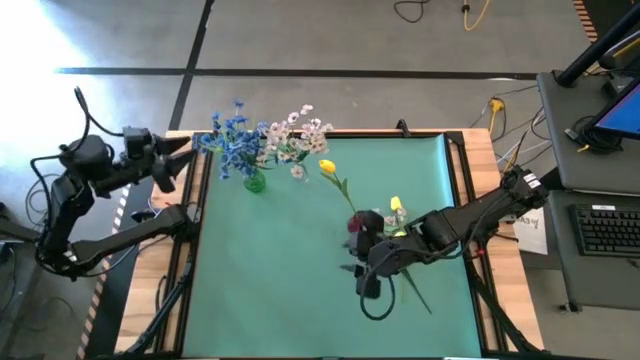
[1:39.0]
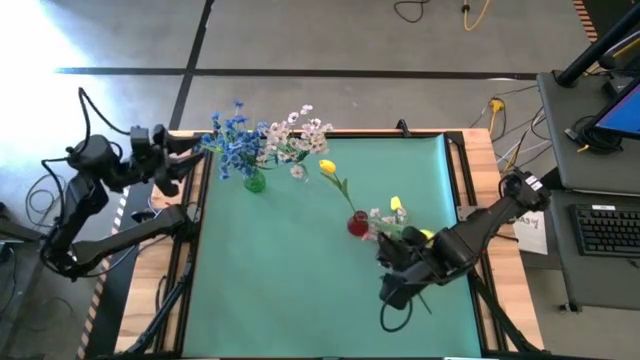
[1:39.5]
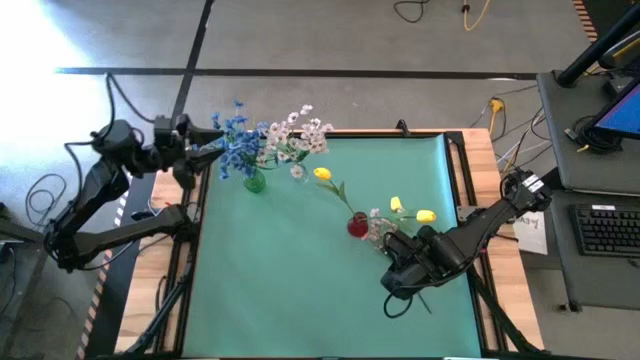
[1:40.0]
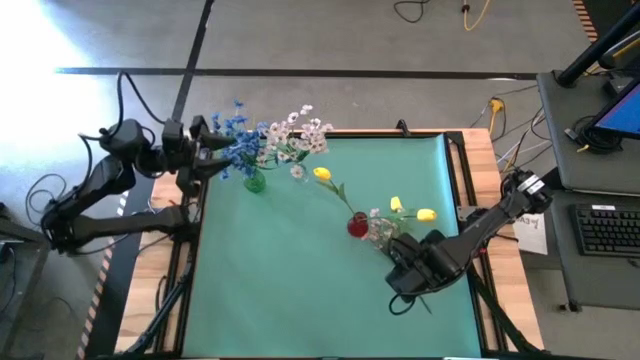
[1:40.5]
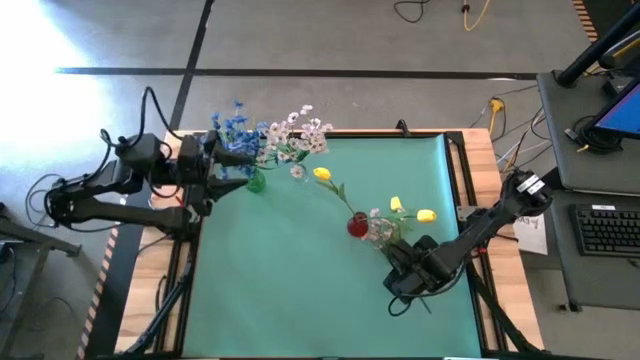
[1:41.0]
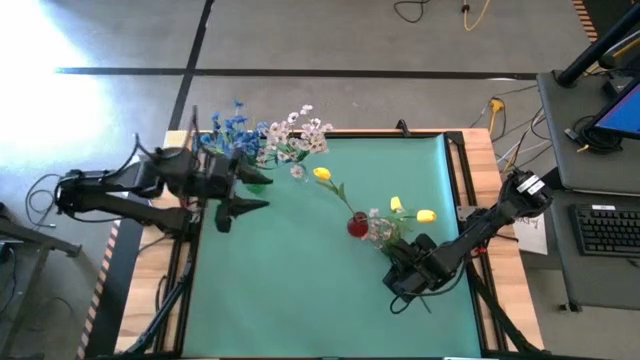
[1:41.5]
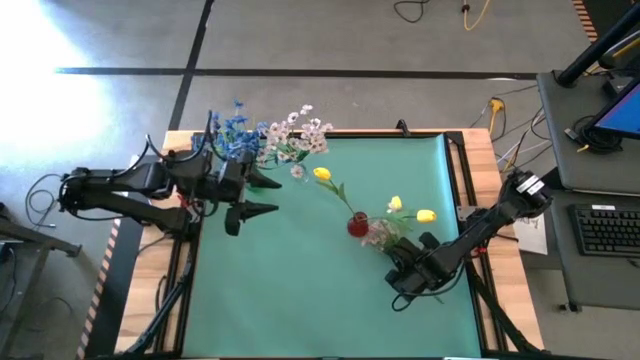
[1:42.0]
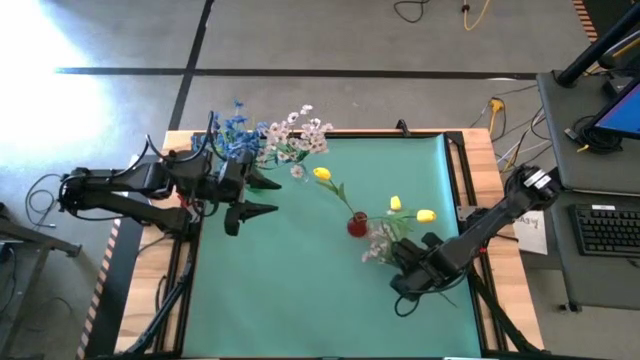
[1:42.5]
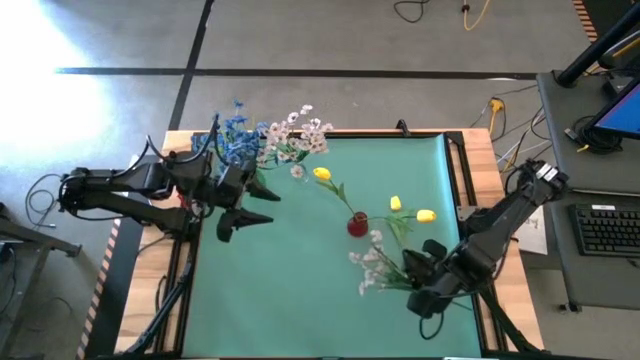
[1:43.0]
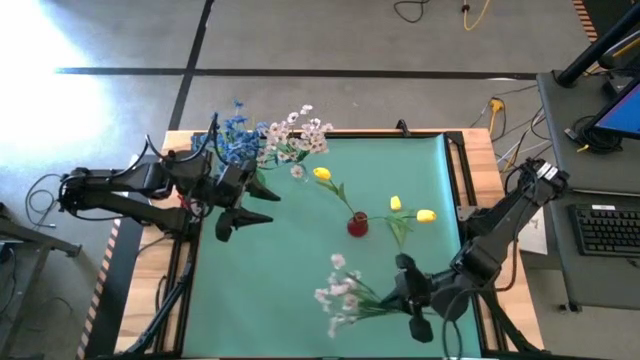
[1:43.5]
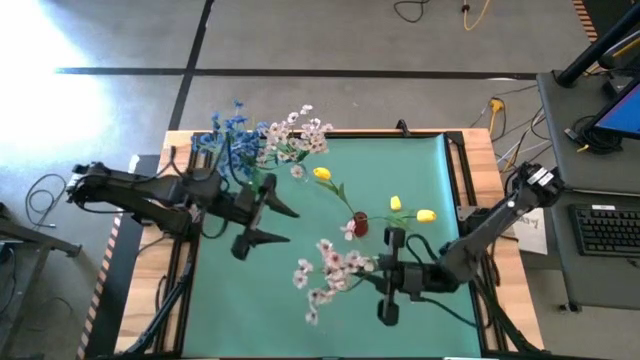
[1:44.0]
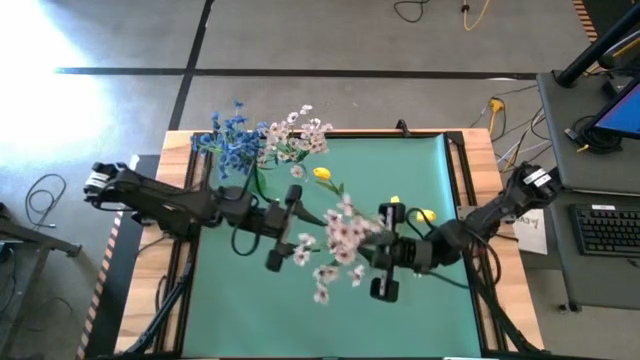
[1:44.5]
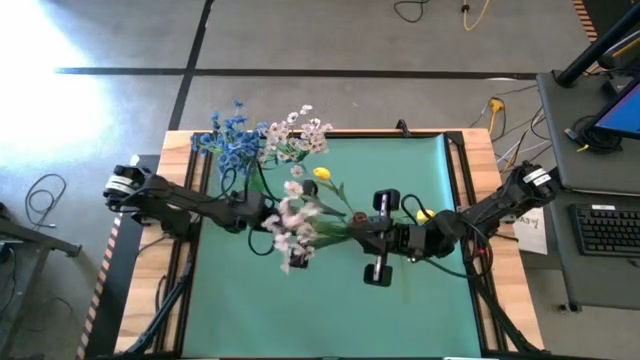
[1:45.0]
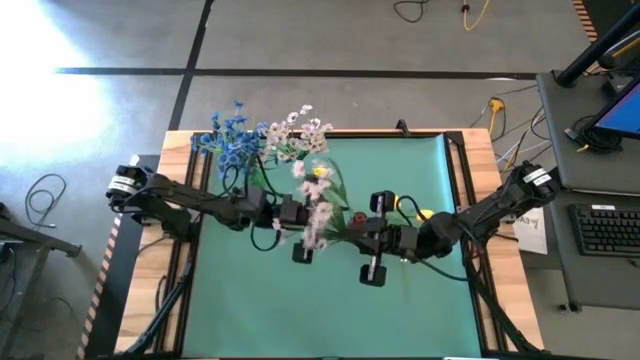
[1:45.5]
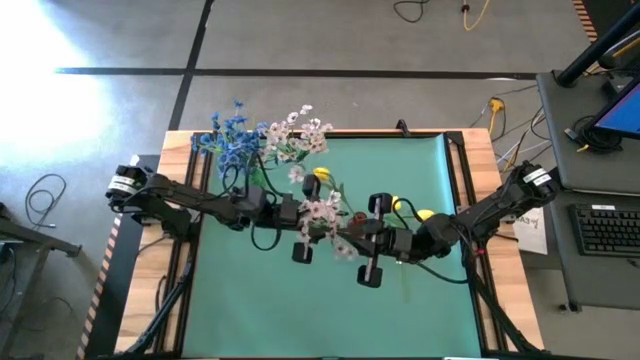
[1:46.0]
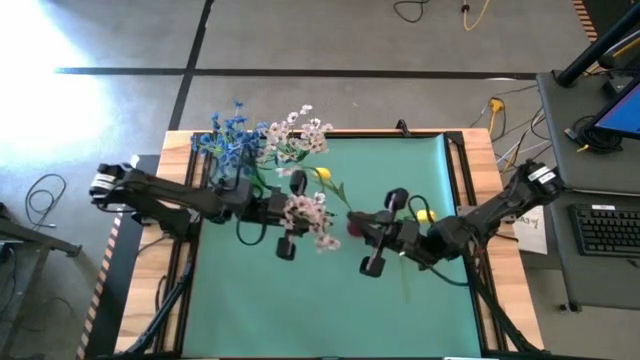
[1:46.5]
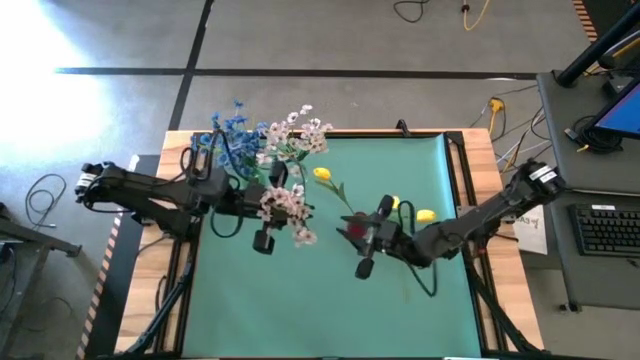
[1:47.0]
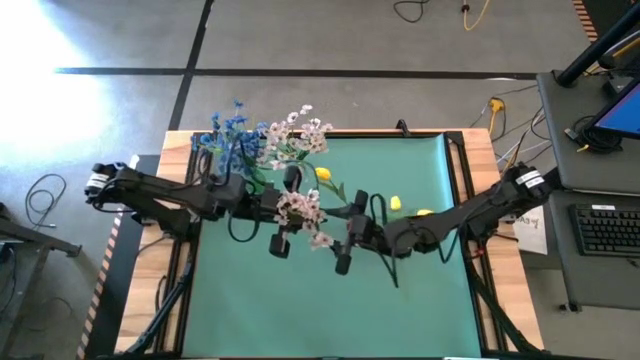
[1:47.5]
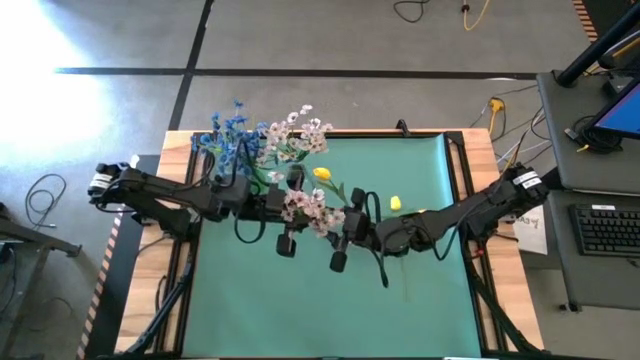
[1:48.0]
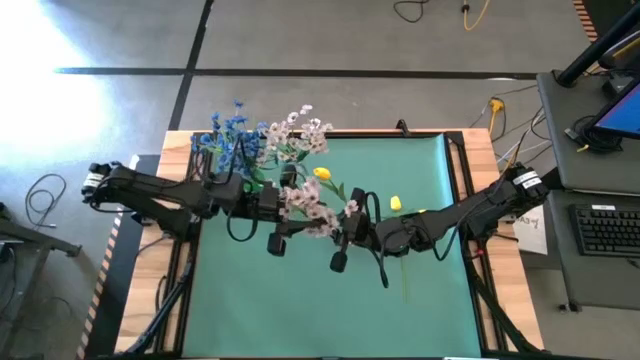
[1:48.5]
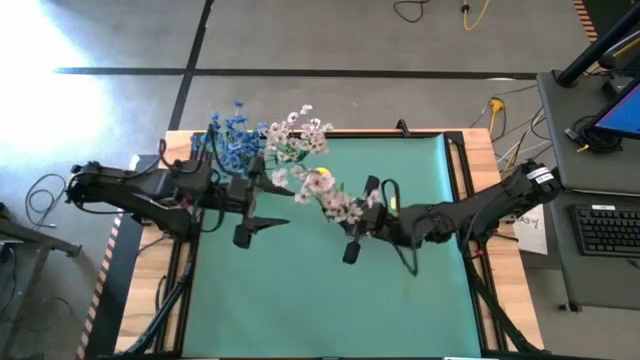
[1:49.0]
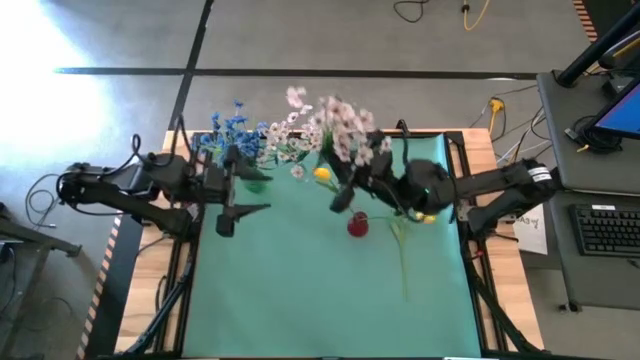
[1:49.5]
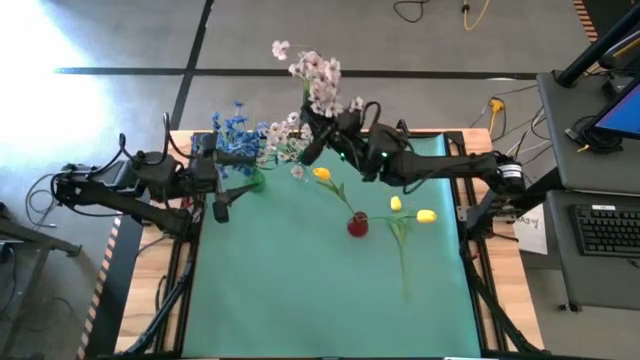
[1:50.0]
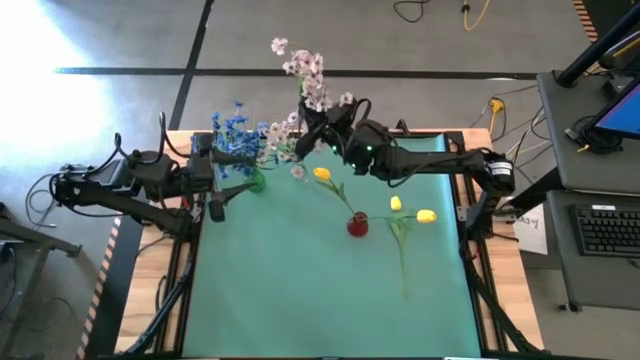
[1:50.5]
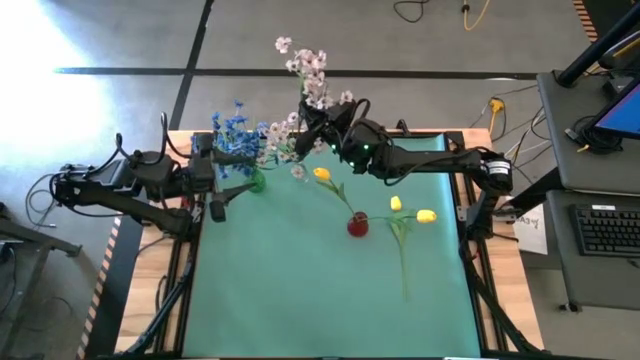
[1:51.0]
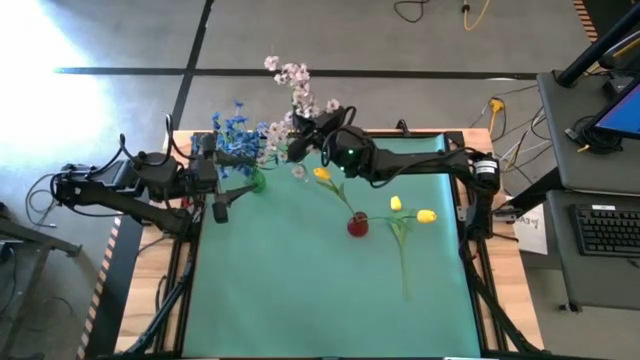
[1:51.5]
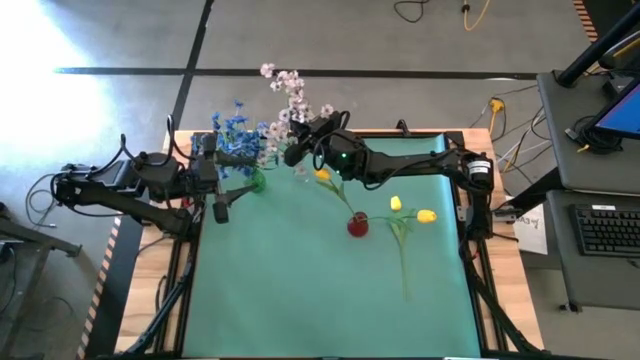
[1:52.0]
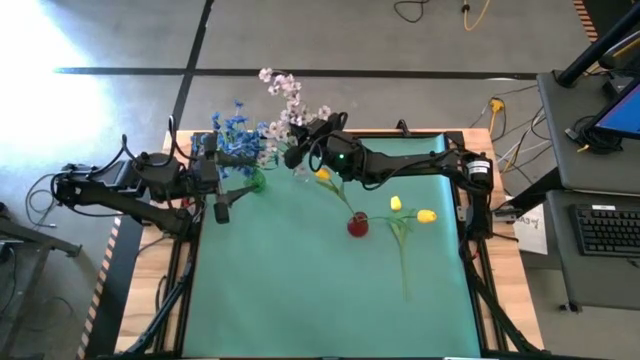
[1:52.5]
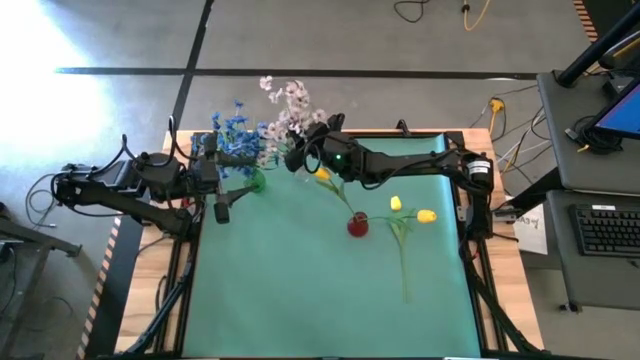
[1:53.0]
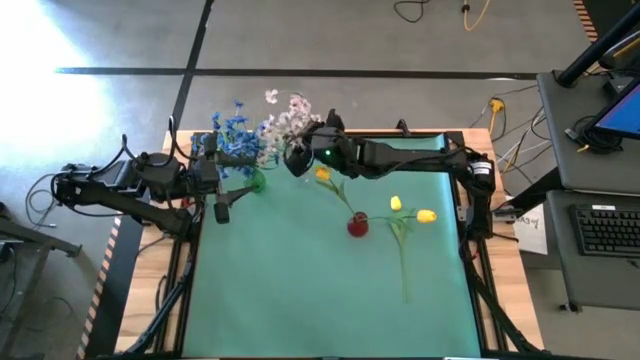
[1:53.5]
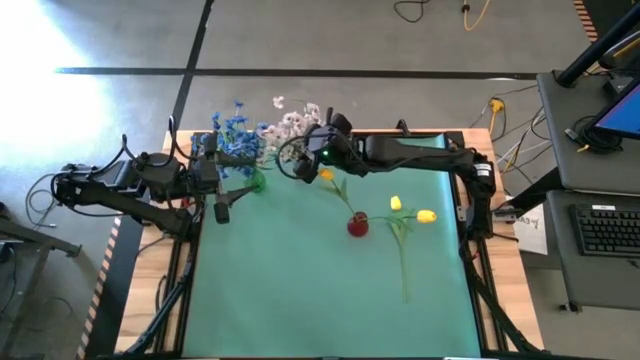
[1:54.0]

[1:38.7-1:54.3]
Task: Sort flowers into vase by color
Put the white flowers into the transparent vase

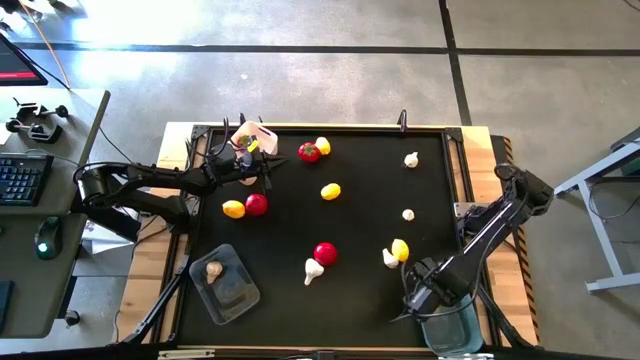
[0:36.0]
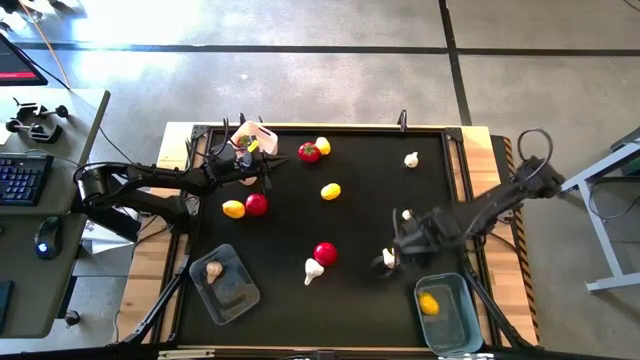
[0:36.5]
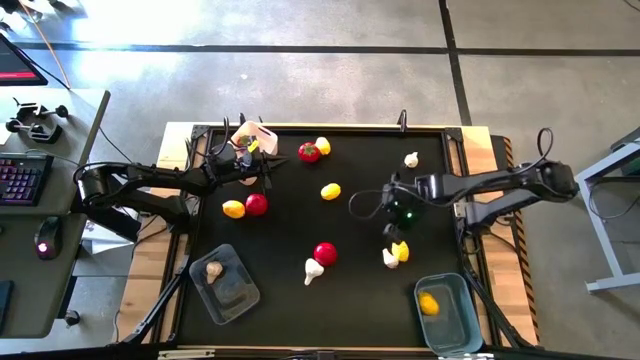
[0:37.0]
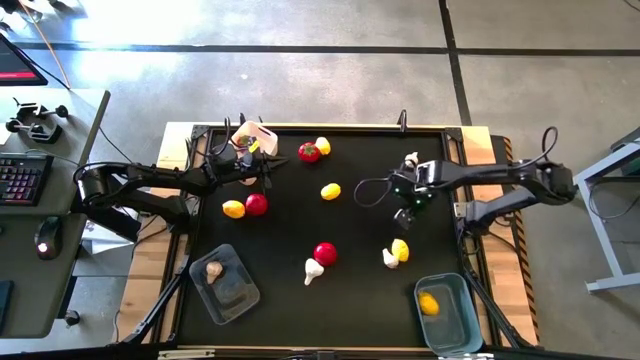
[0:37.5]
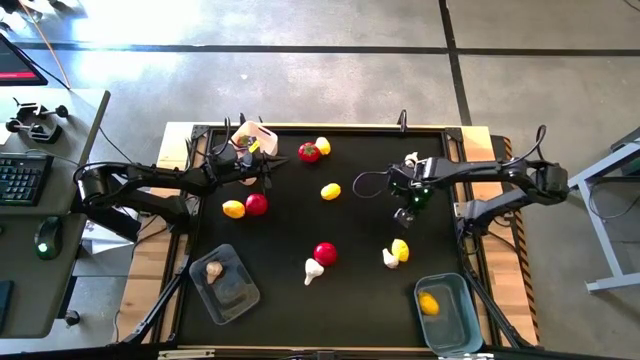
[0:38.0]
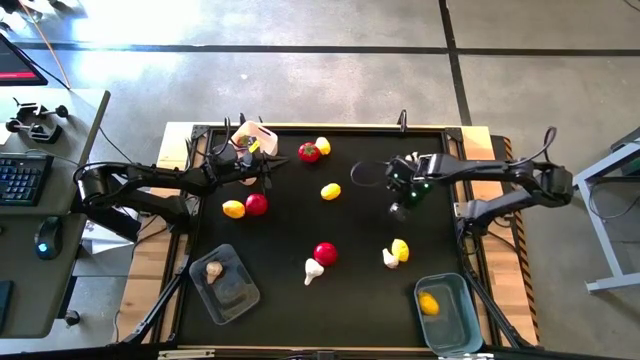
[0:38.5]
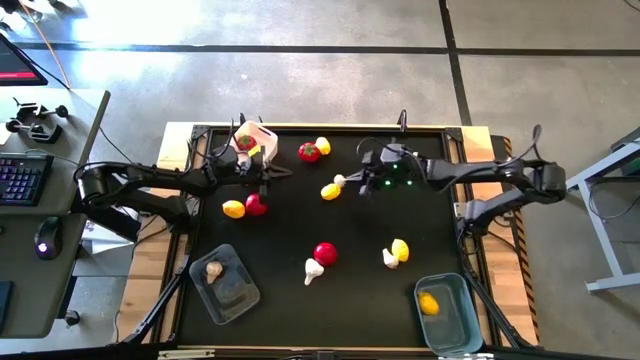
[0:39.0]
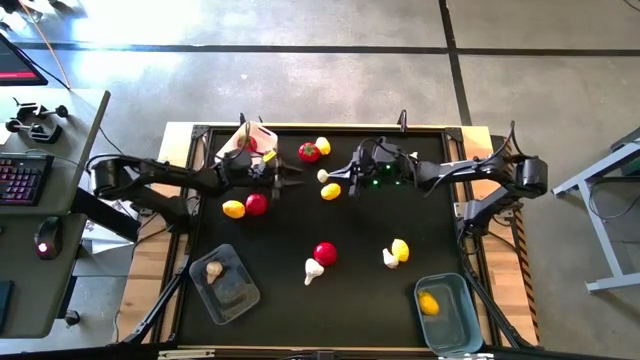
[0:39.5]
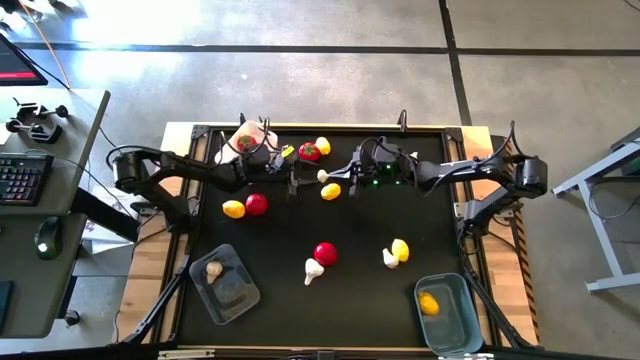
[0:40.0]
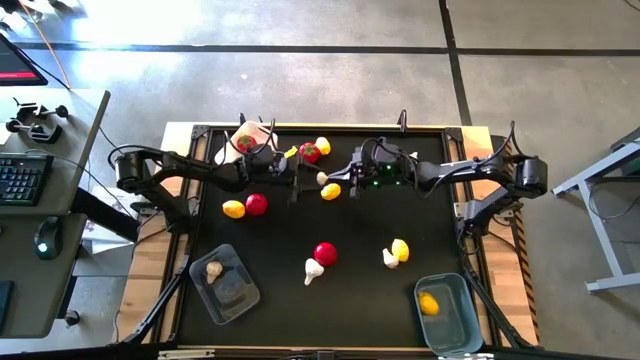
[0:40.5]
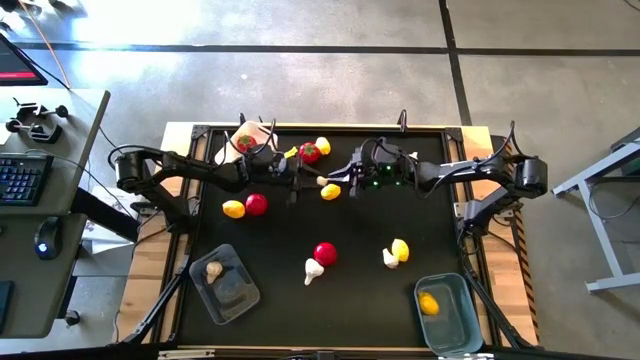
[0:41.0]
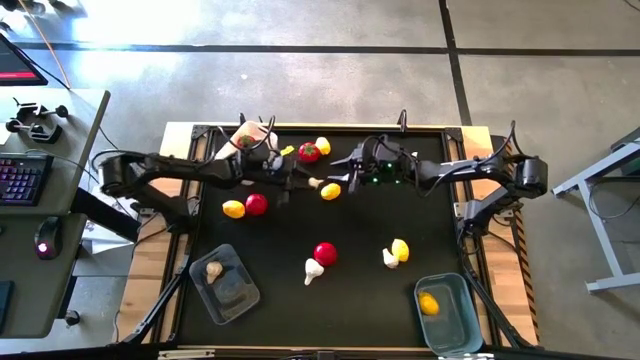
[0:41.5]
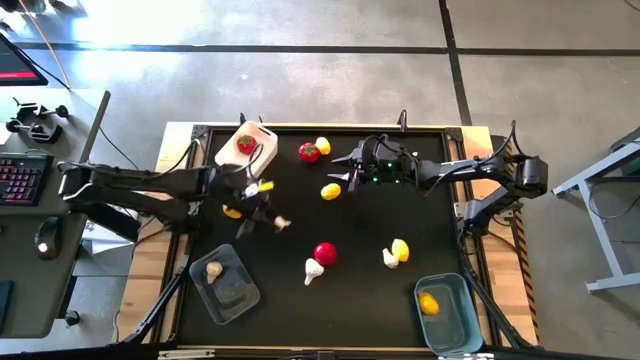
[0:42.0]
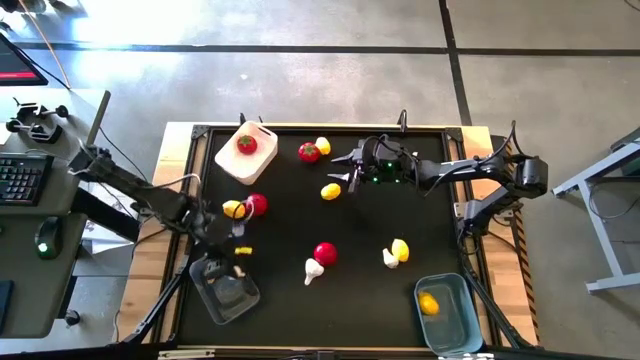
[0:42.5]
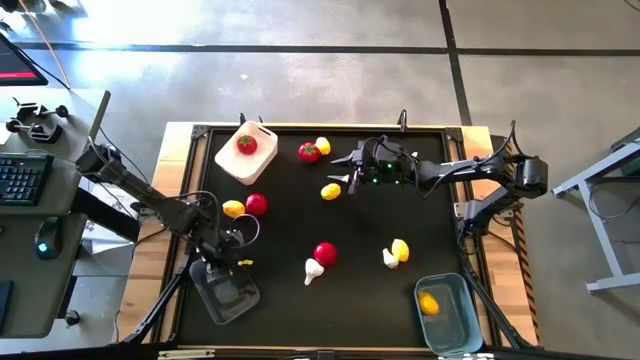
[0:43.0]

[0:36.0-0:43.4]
Task: Sort produce into baskets
Put the white garlic into the transparent bin
